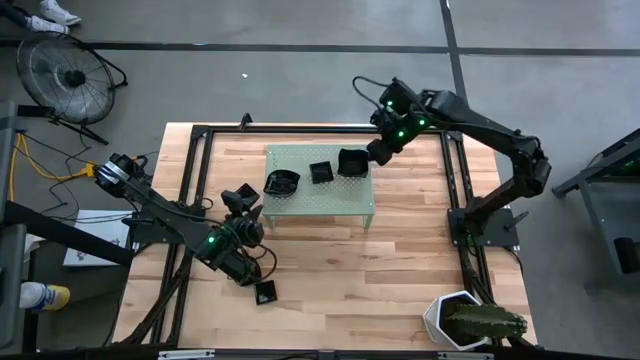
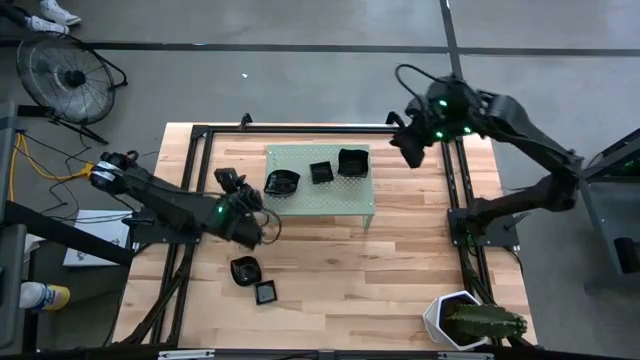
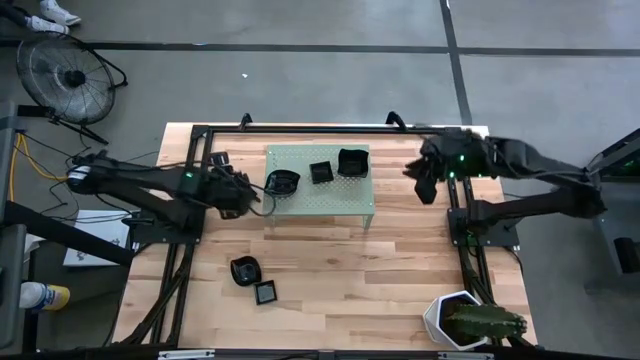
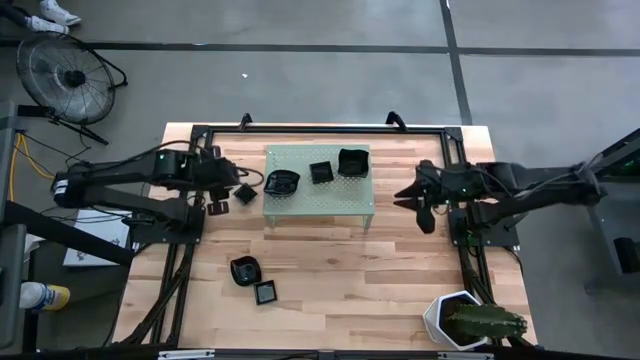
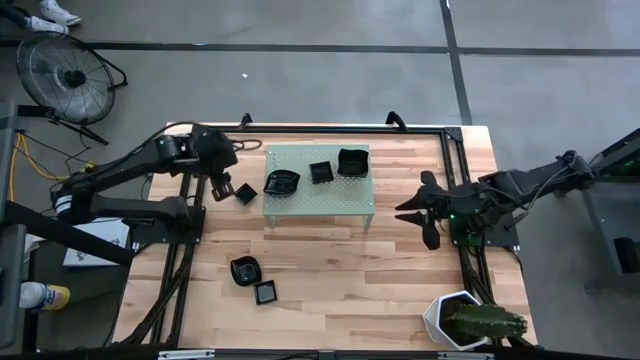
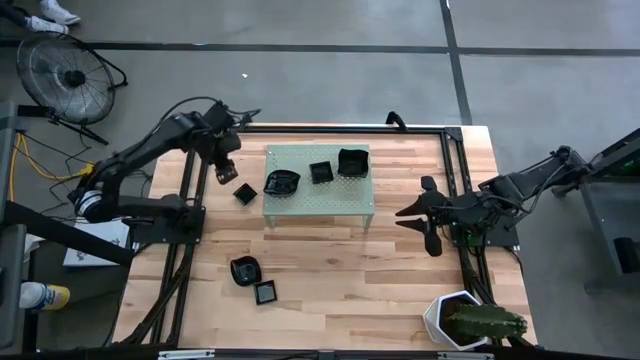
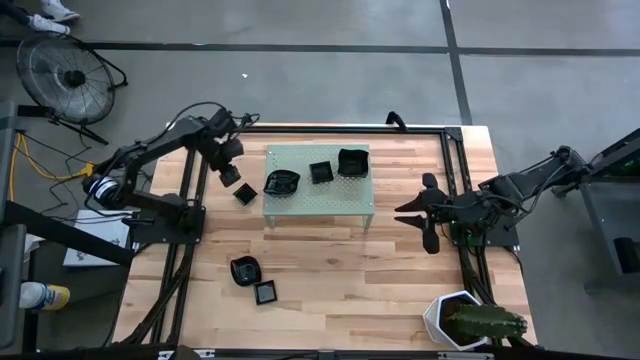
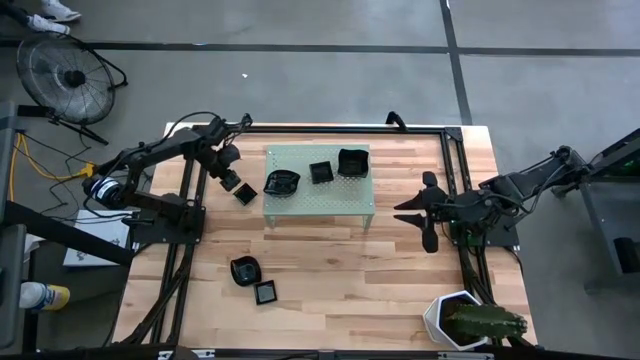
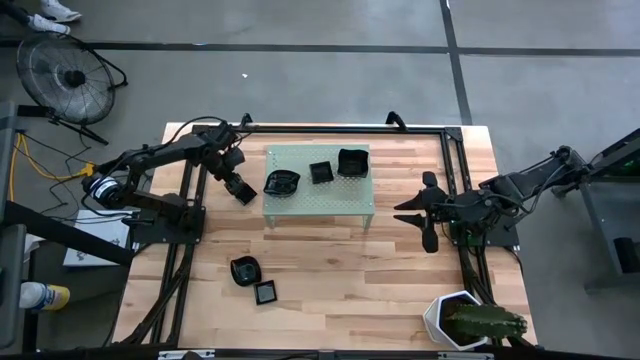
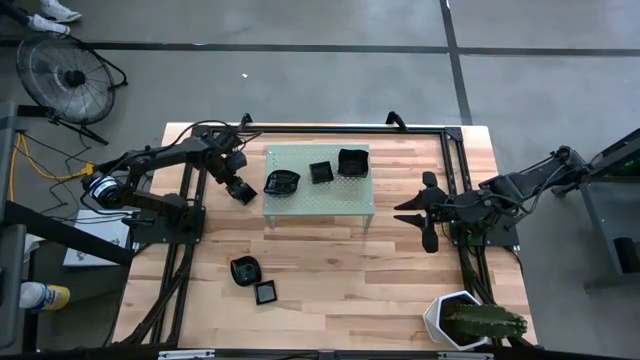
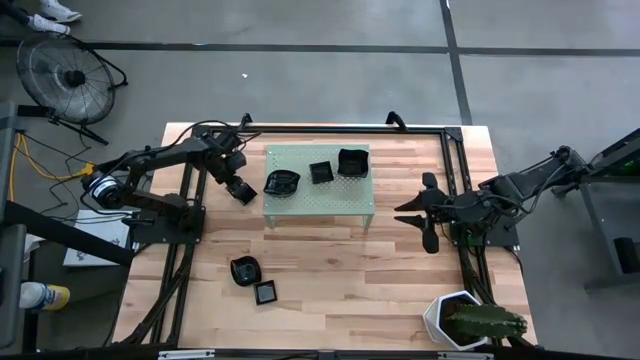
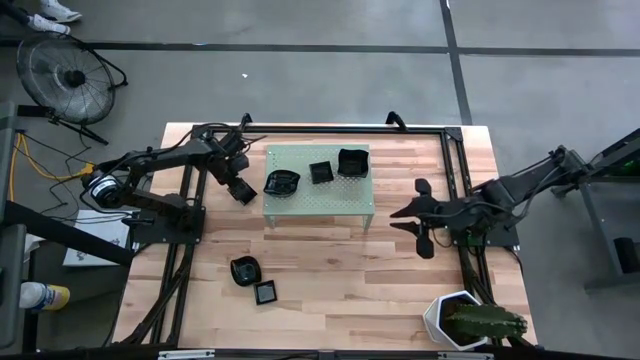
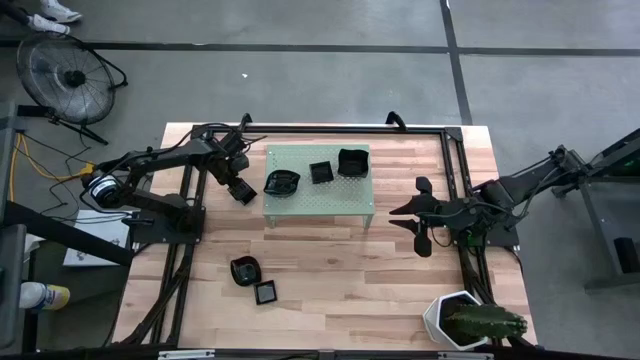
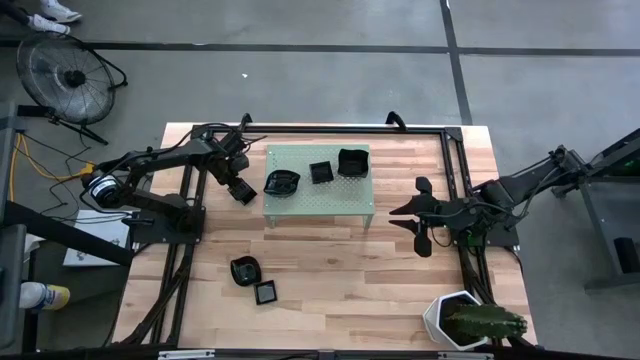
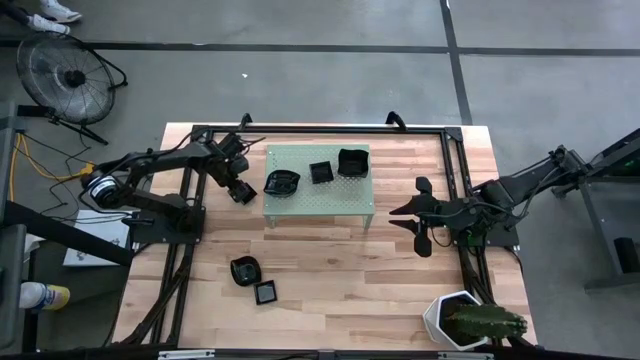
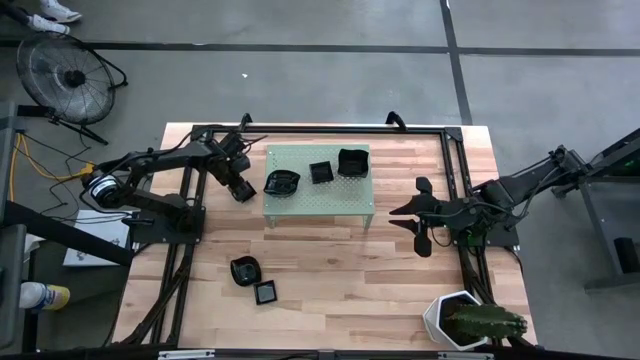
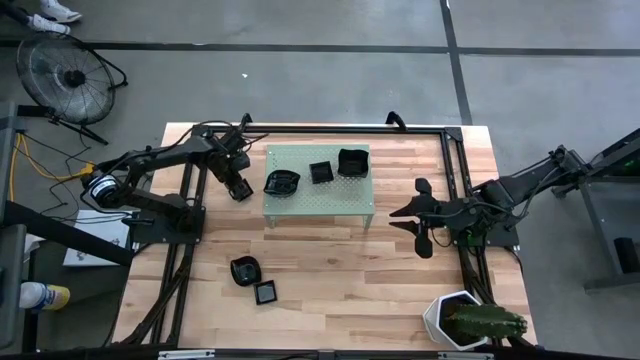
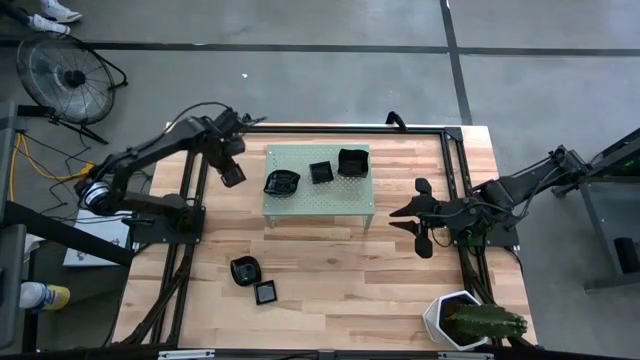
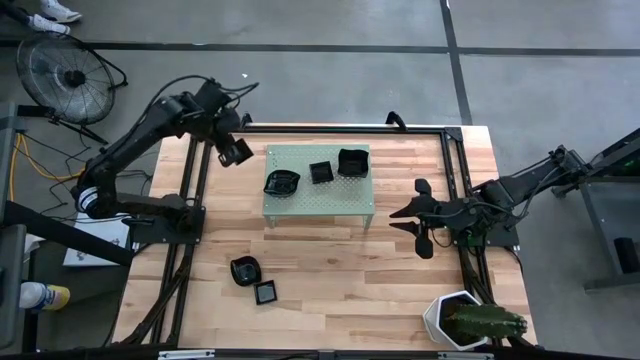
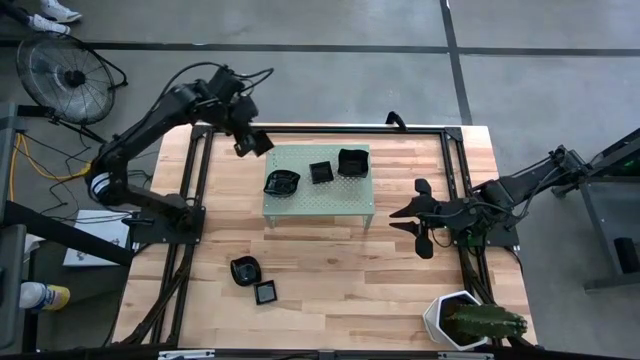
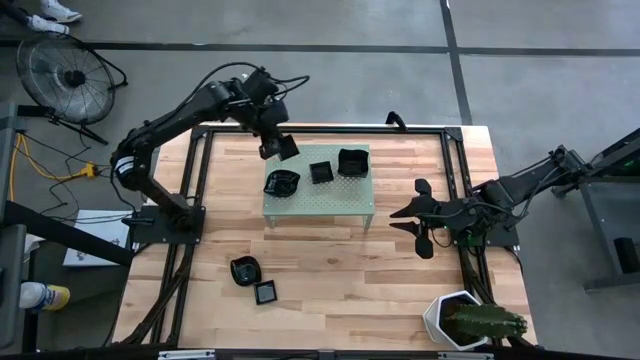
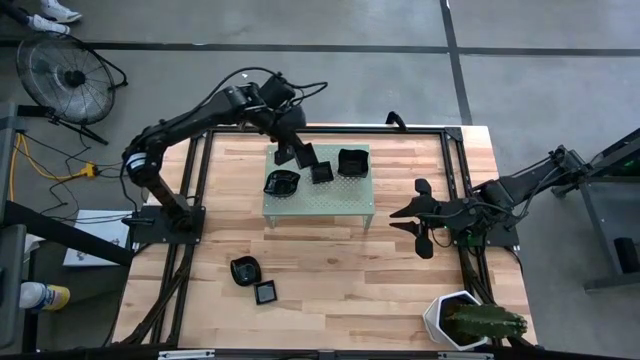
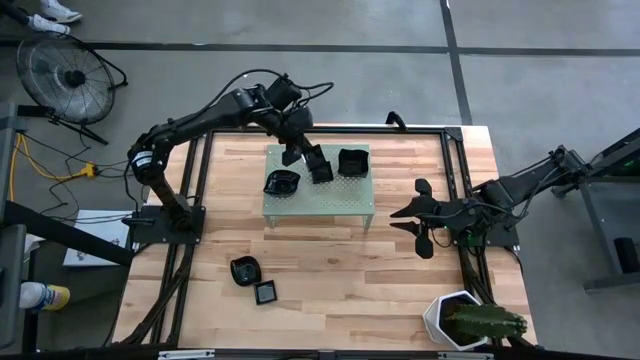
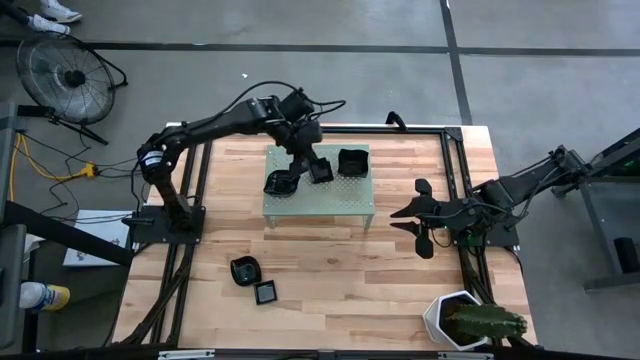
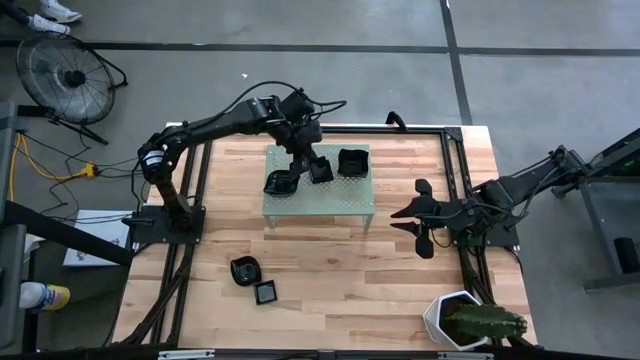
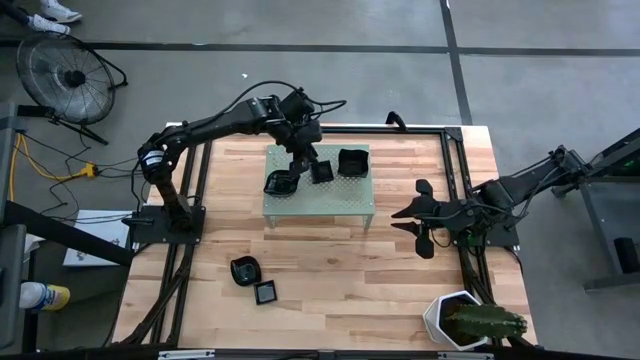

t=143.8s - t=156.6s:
Task: Pick & Place Mini shaped plates
Stack the square plate on top of the other square plates on the shelf

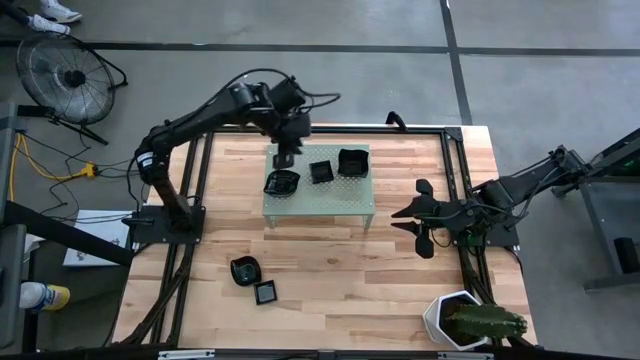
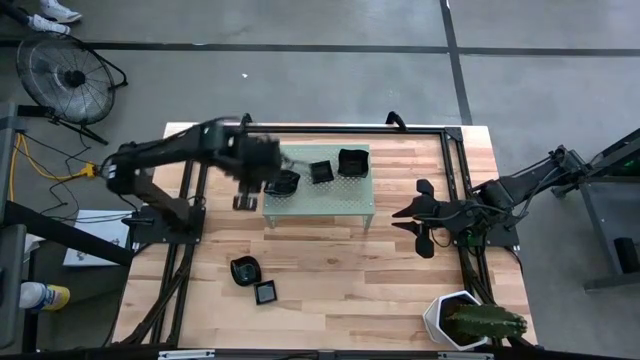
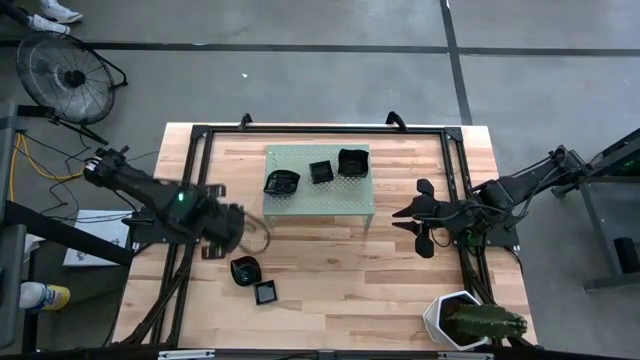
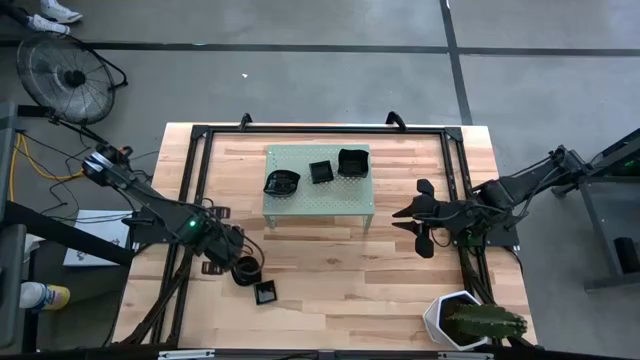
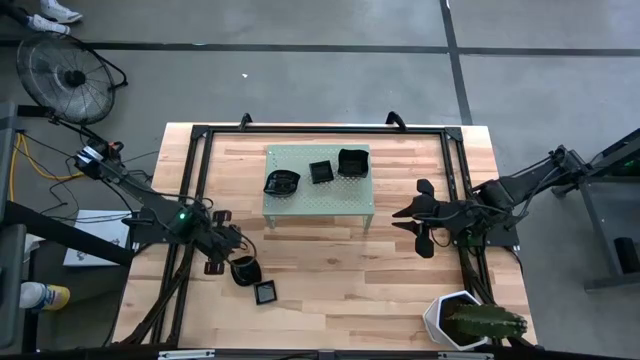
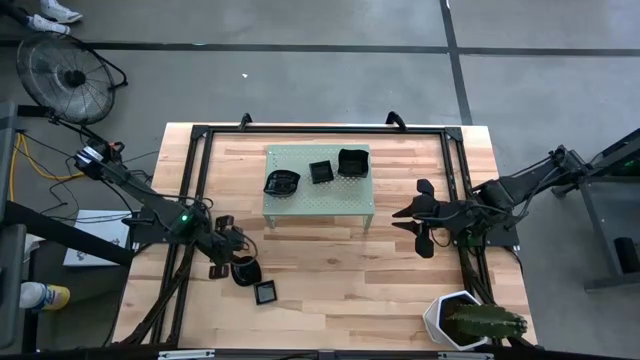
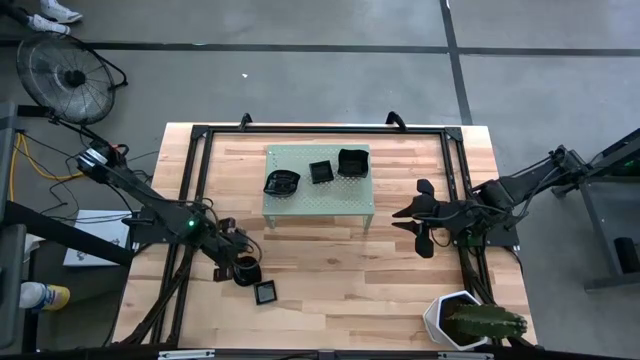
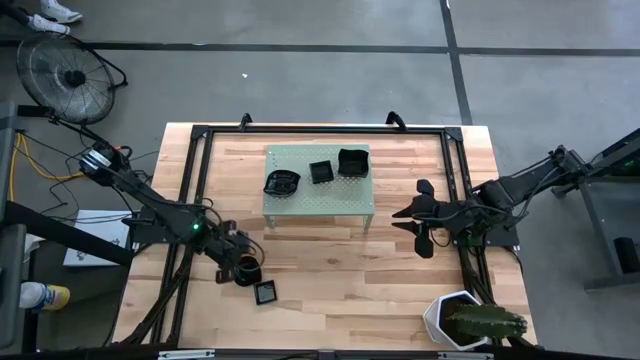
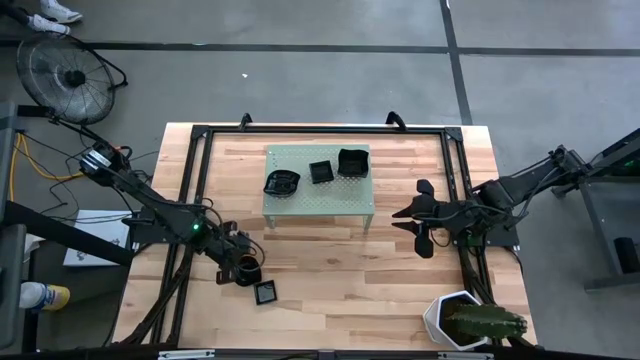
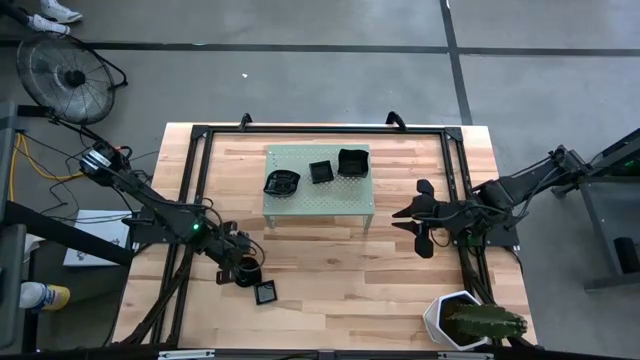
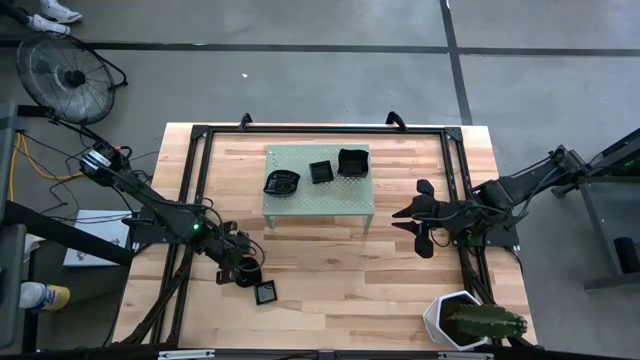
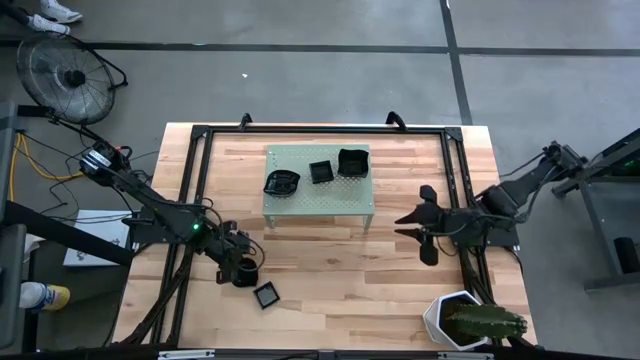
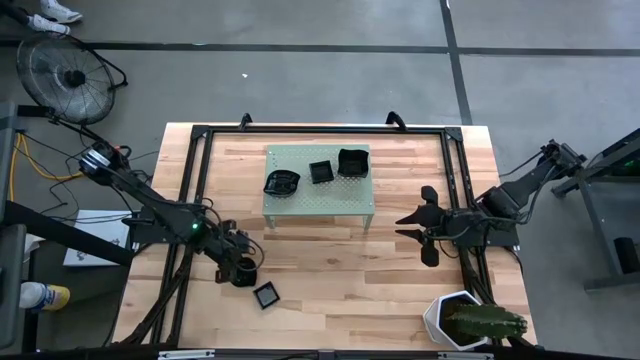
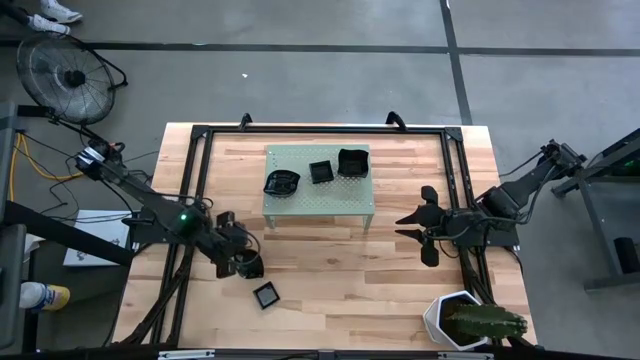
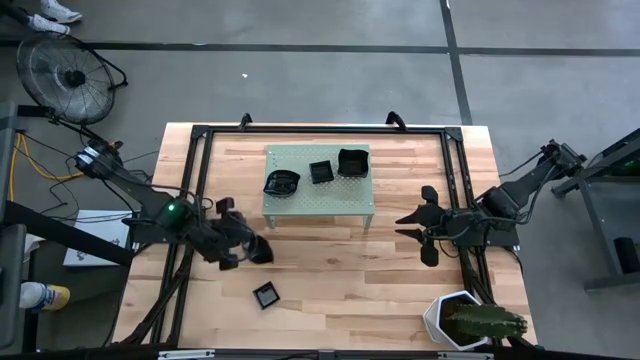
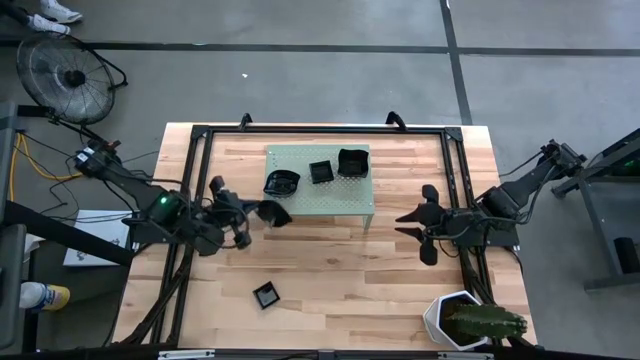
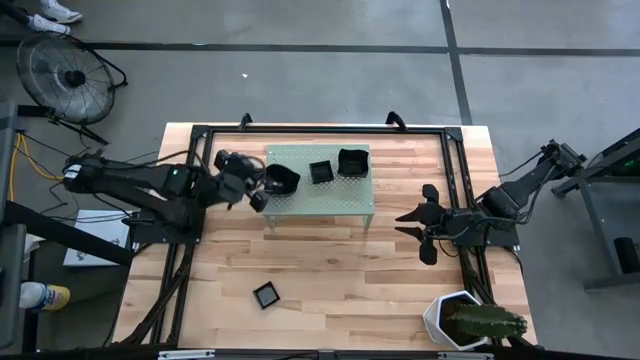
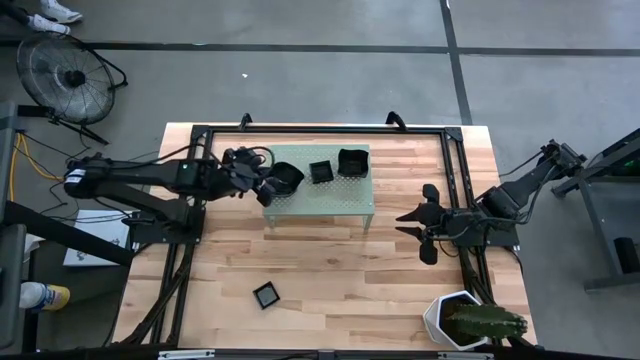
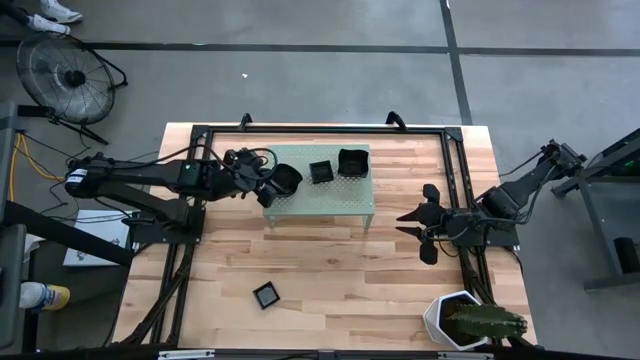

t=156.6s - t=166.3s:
Stack the leaf-shaped plate on top of the other leaf-shaped plates on the shelf
